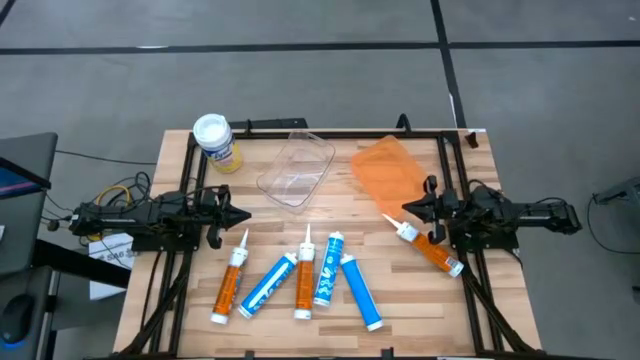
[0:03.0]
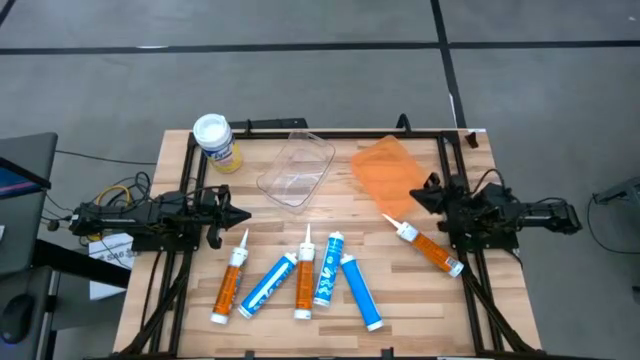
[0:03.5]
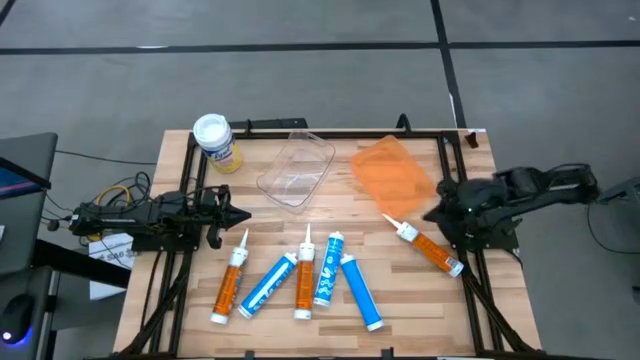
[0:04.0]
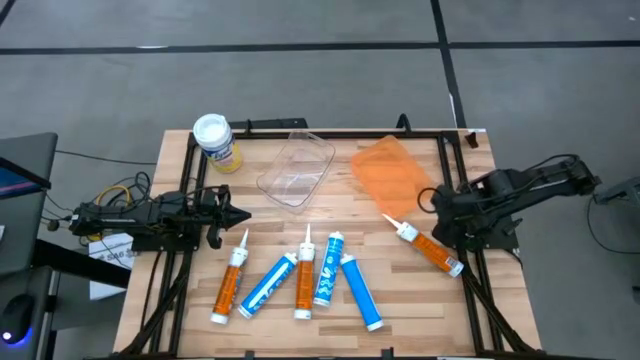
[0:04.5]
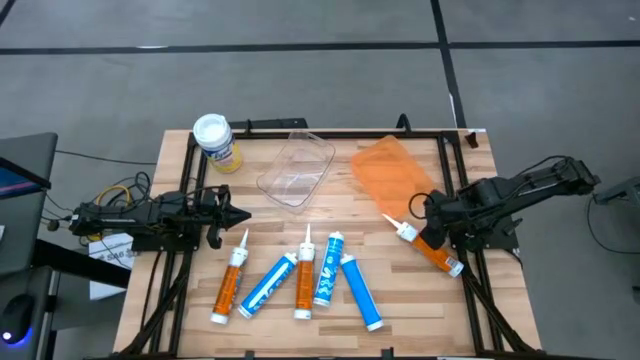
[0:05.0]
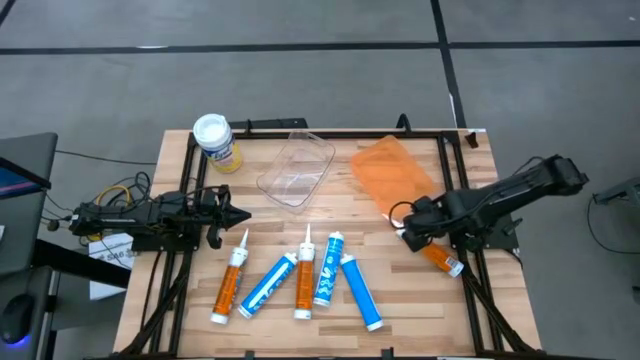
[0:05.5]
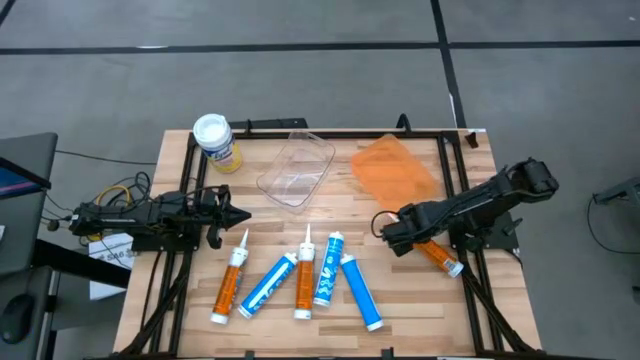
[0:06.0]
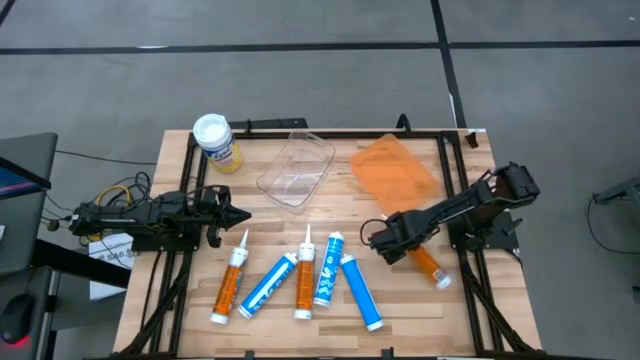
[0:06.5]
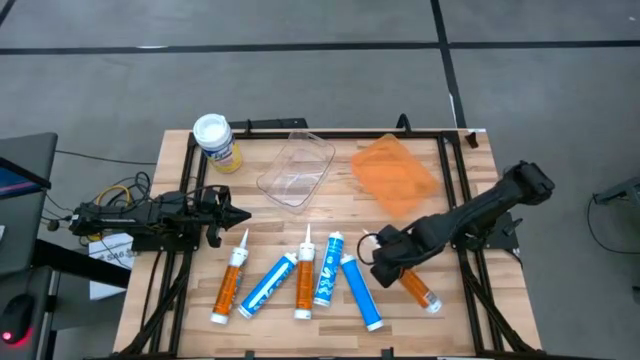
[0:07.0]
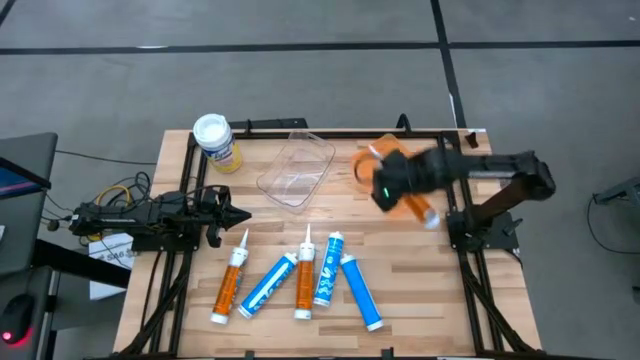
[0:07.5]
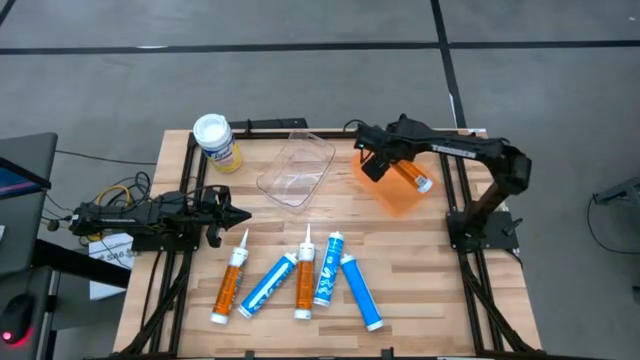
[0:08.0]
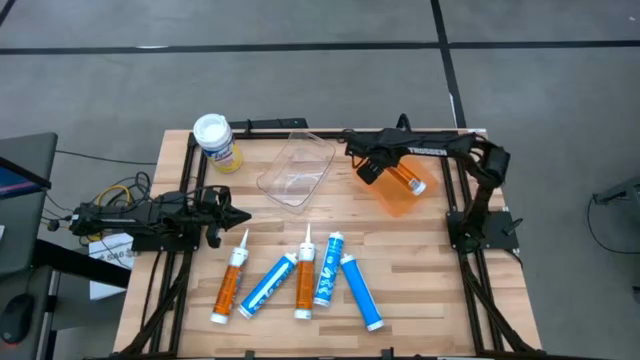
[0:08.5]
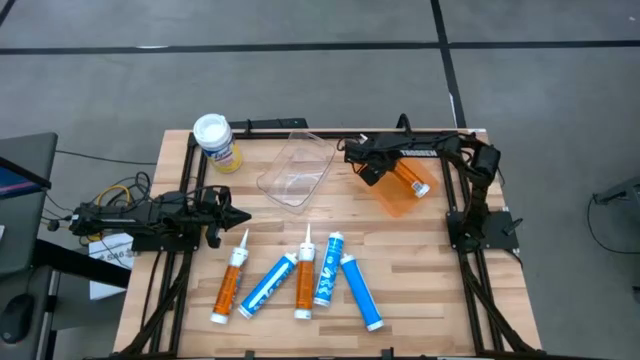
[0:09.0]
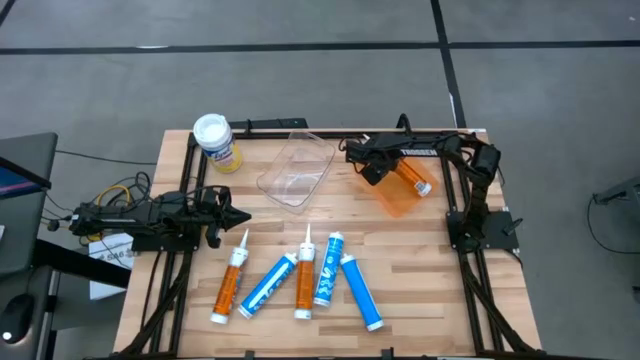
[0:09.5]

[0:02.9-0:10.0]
Task: Pick & place silicon tubes, Sealant and Lysol wipes
Put the right orange sealant into the orange bin

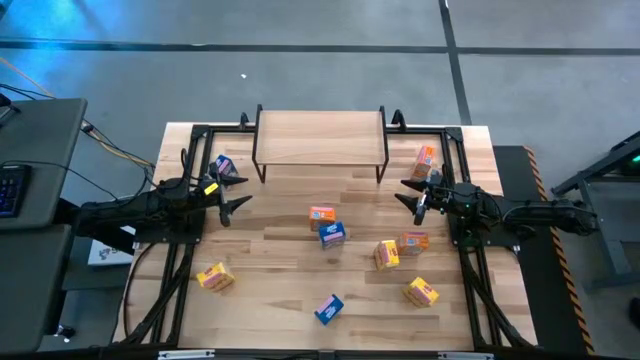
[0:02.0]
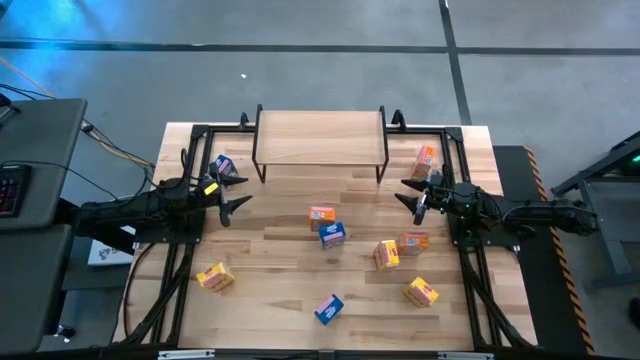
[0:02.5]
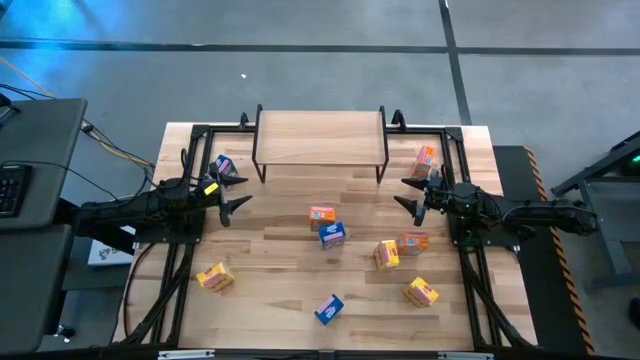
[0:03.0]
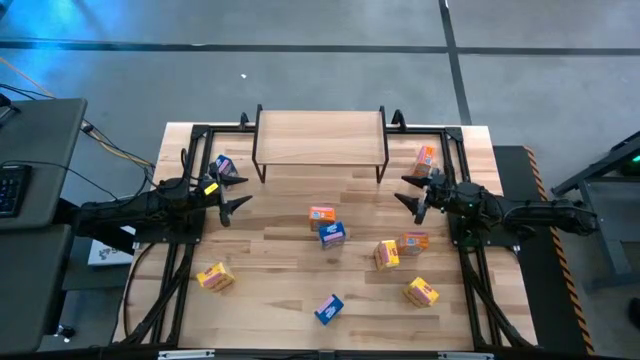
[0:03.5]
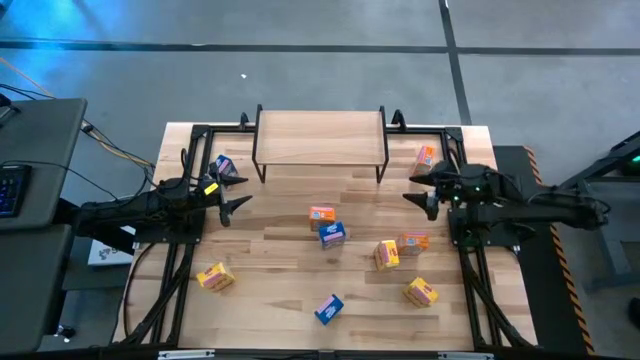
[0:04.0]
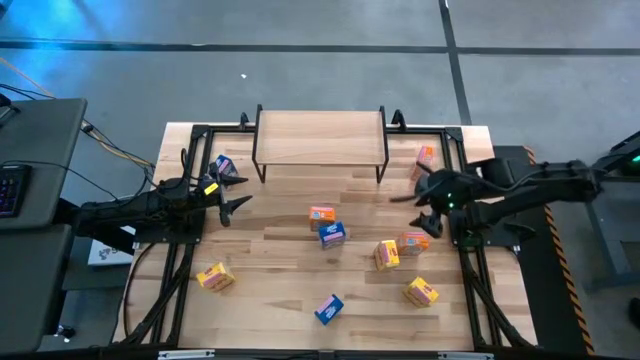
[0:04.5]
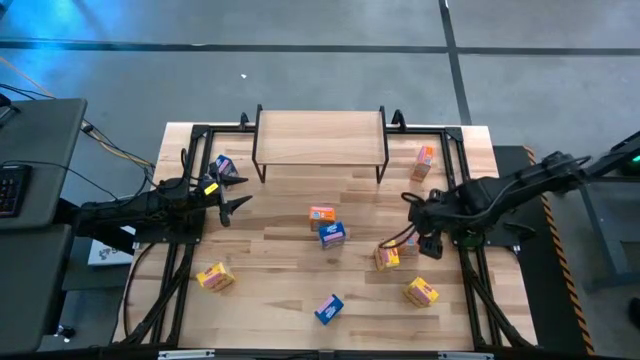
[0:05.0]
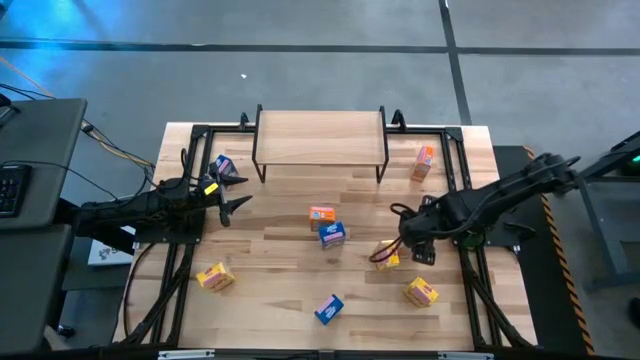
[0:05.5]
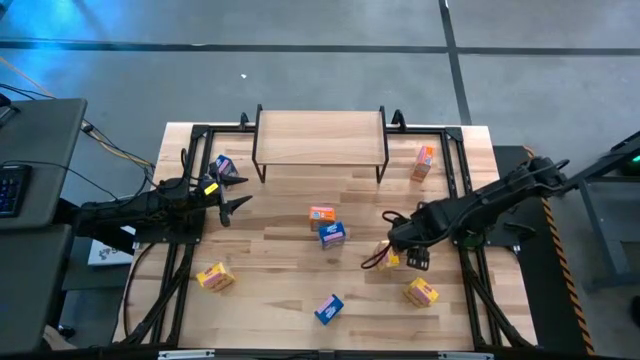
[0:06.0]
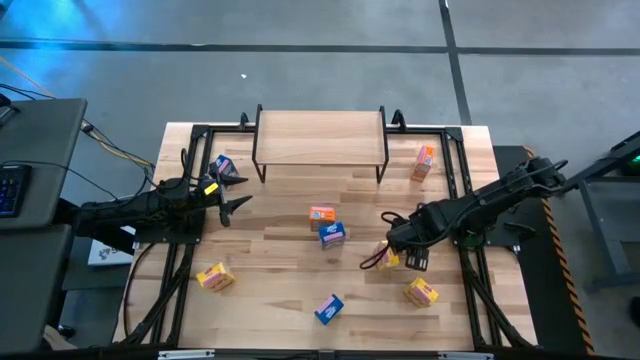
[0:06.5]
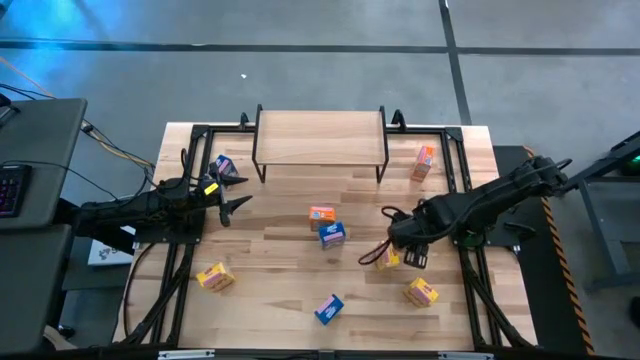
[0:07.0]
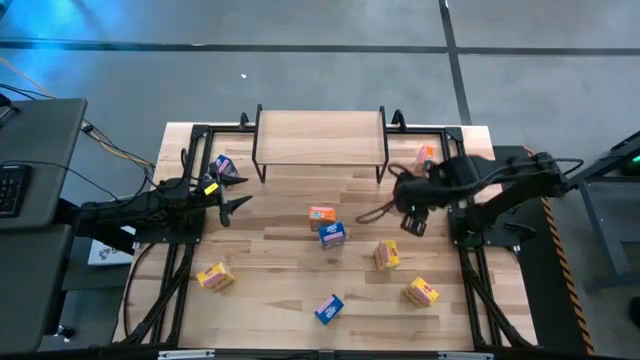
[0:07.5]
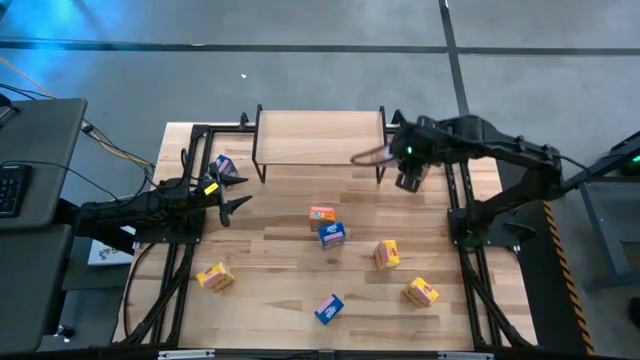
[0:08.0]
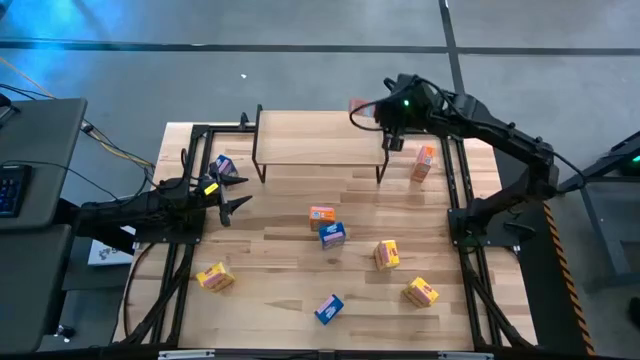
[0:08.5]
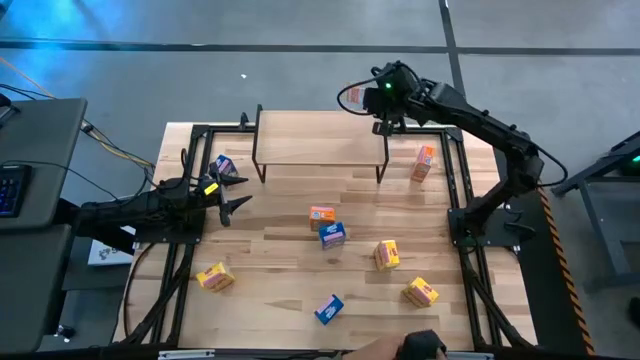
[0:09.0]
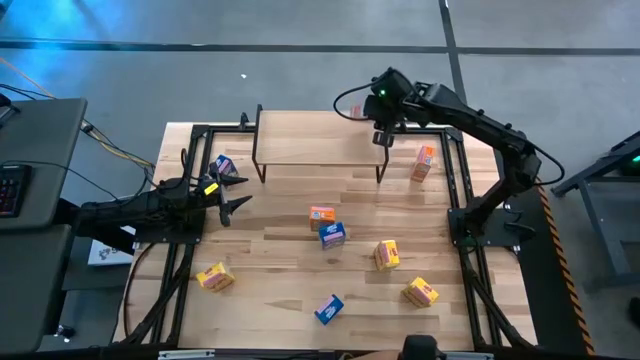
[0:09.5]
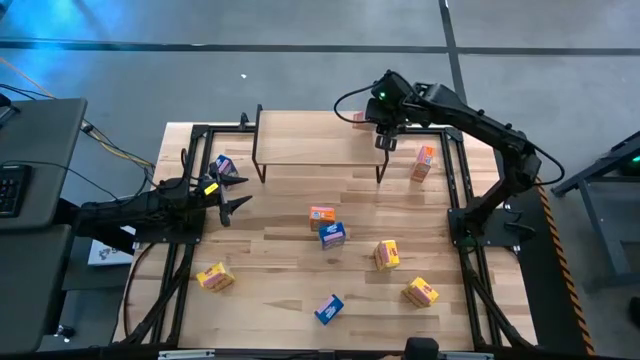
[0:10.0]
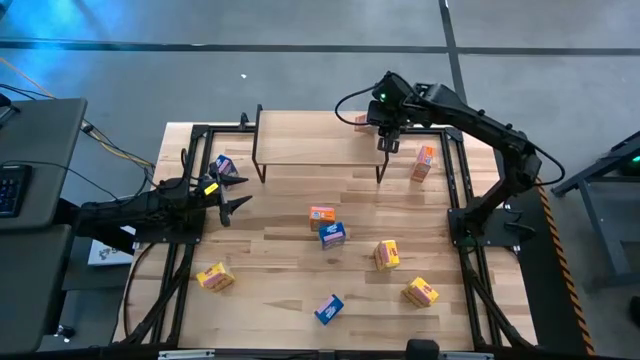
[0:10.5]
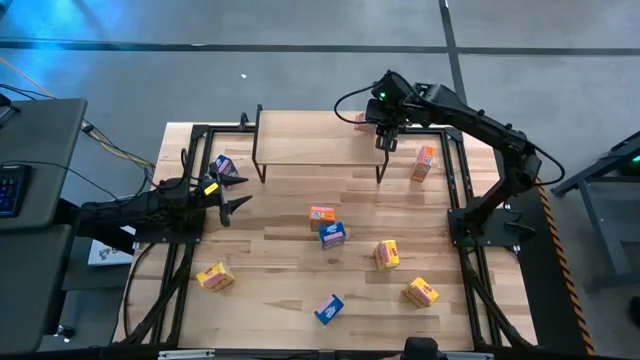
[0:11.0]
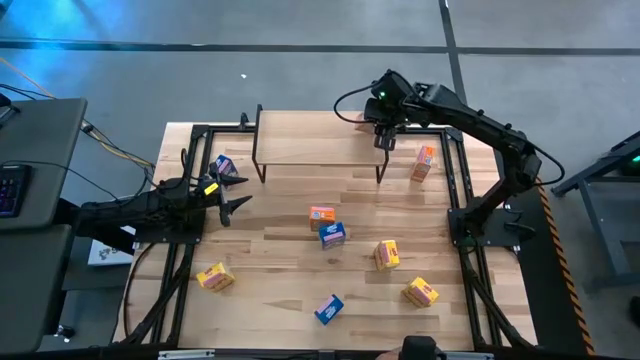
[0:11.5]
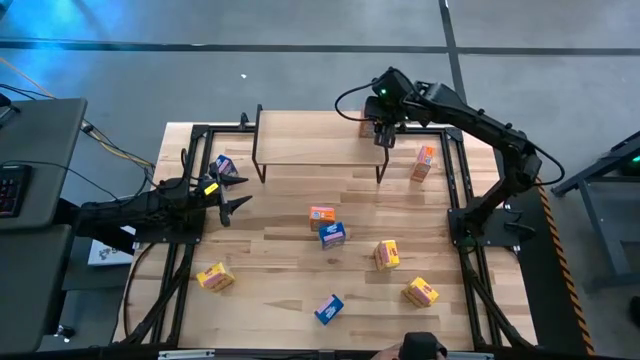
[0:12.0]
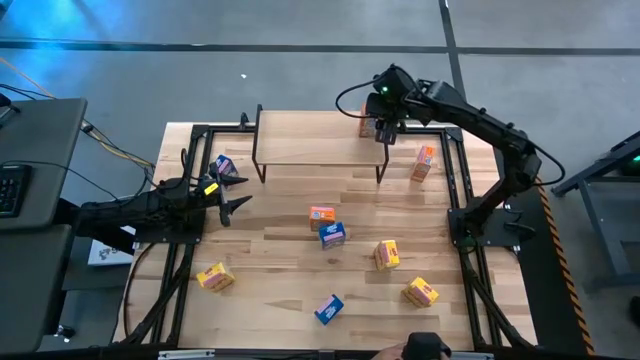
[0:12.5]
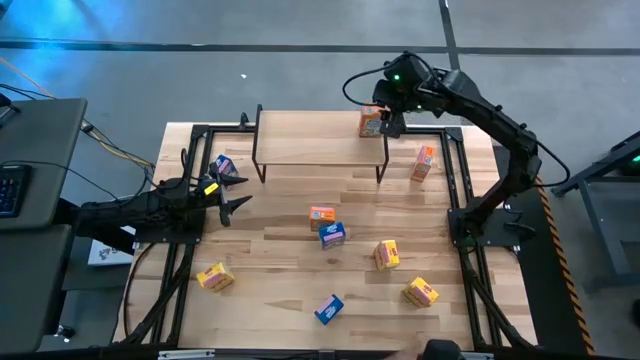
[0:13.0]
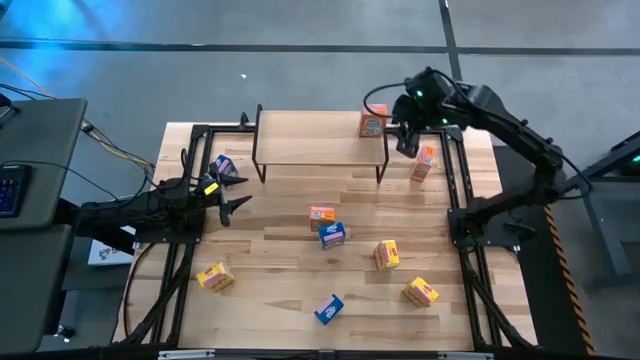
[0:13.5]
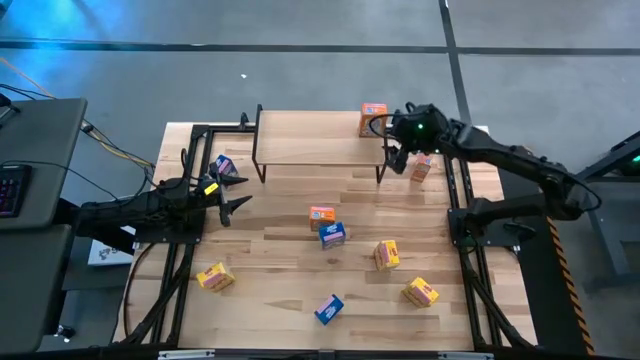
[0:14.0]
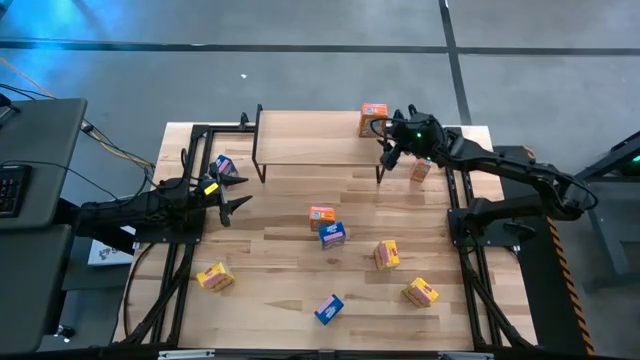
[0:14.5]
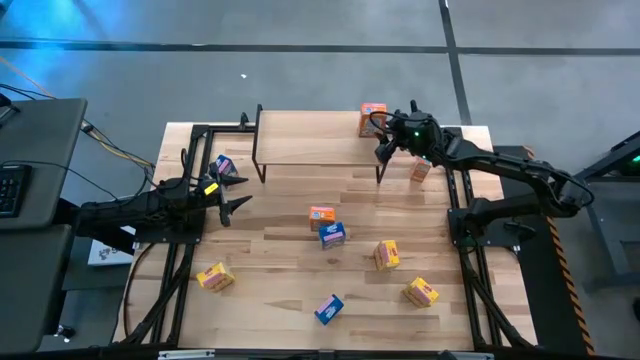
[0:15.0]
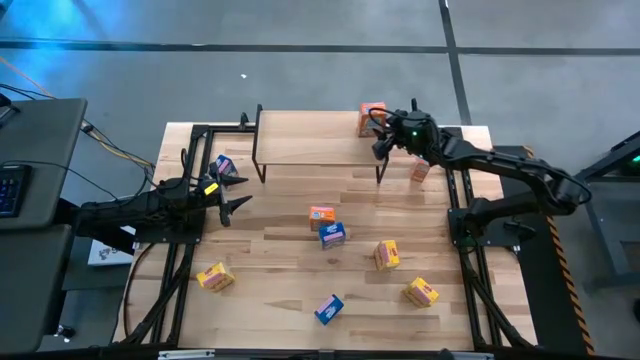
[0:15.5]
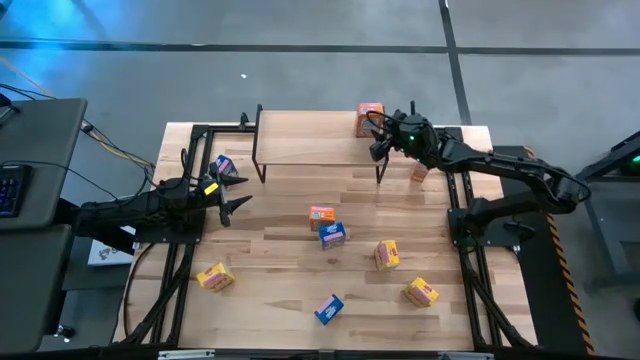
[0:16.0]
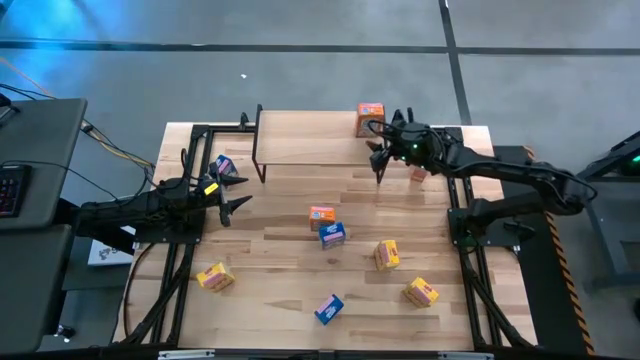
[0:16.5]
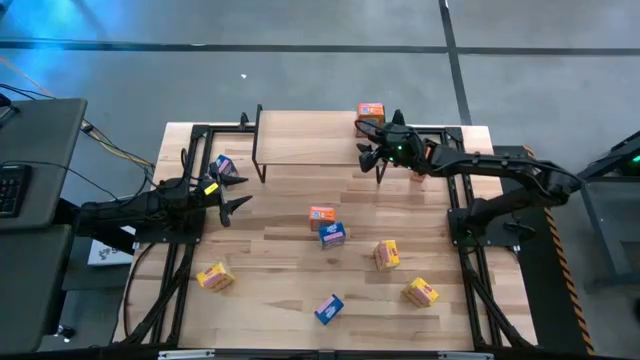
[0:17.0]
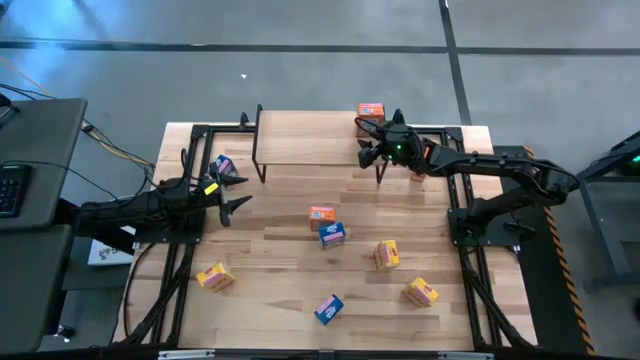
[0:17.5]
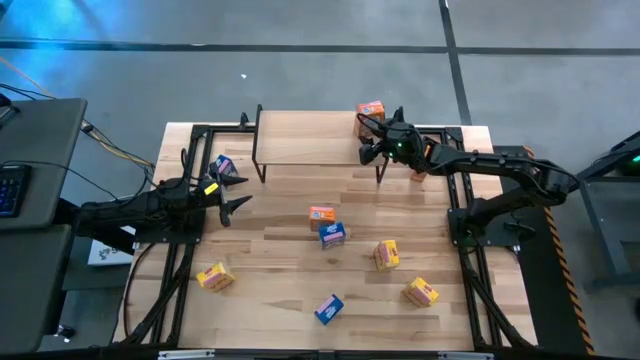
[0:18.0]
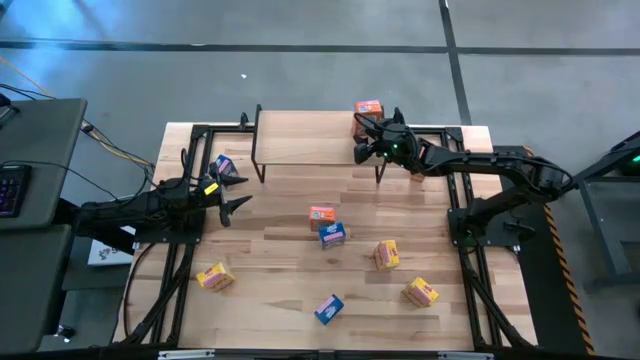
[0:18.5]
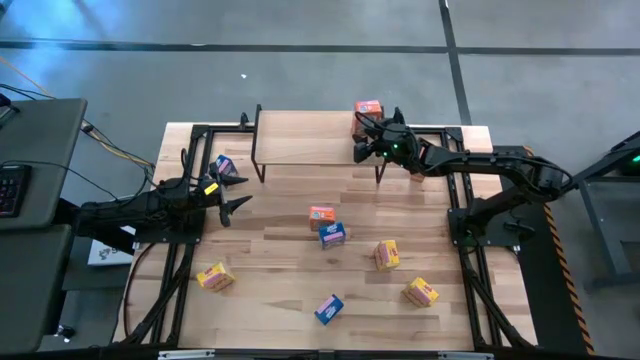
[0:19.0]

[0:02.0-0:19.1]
Task: Stack cereal on shelf
Put the bottom right orange cereal box on the shelf
